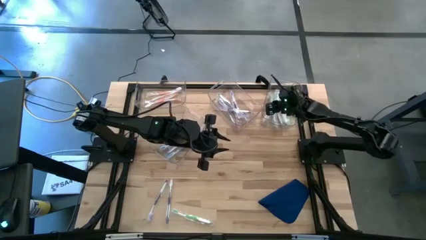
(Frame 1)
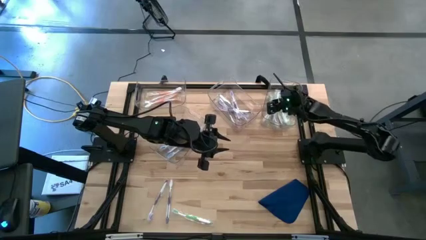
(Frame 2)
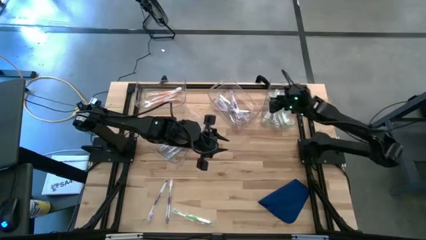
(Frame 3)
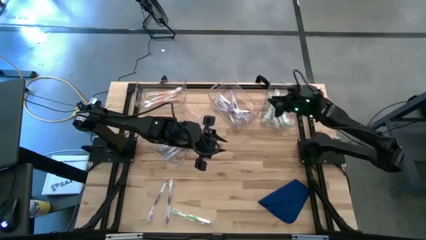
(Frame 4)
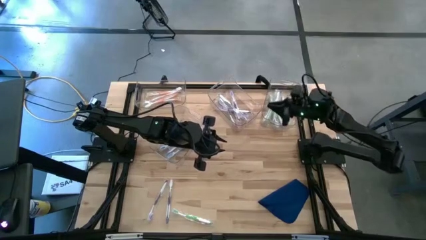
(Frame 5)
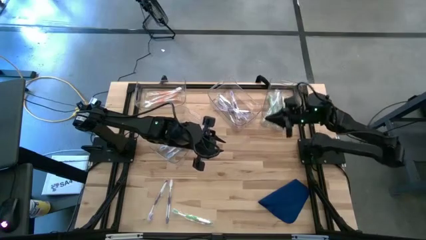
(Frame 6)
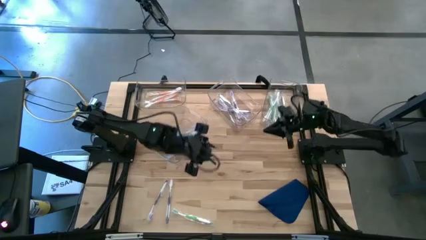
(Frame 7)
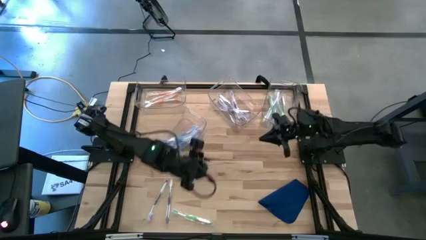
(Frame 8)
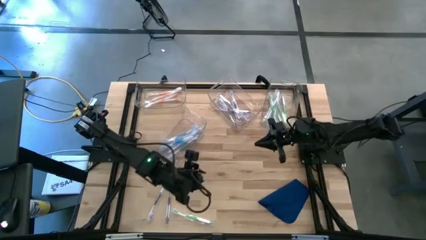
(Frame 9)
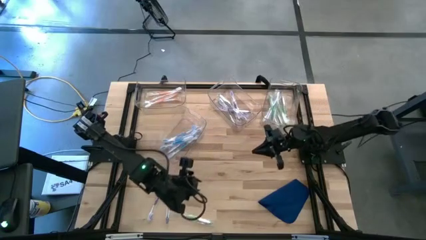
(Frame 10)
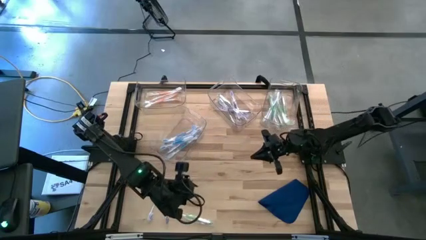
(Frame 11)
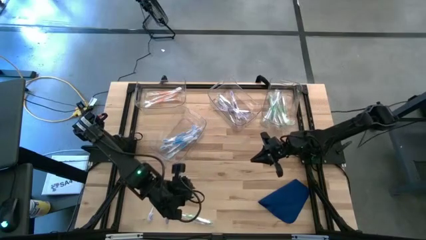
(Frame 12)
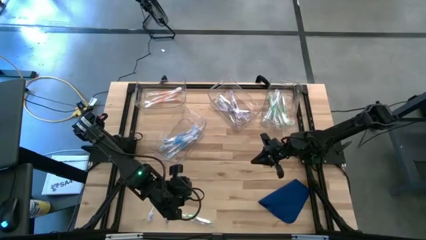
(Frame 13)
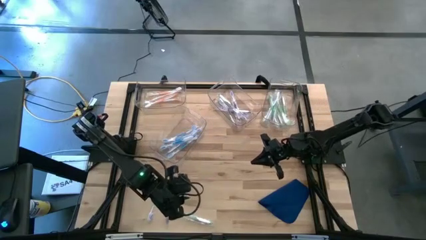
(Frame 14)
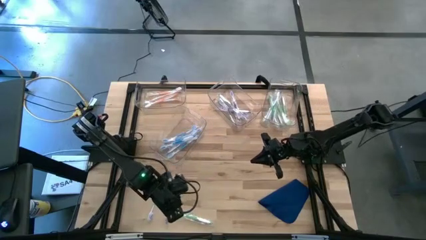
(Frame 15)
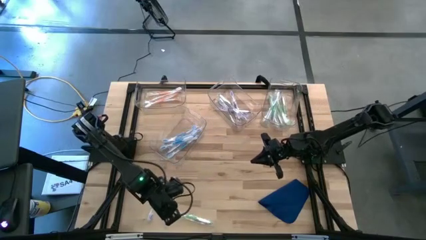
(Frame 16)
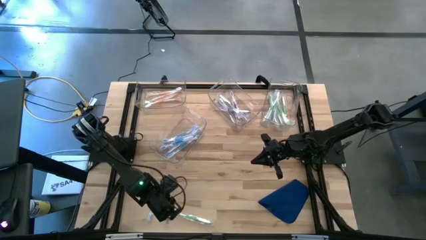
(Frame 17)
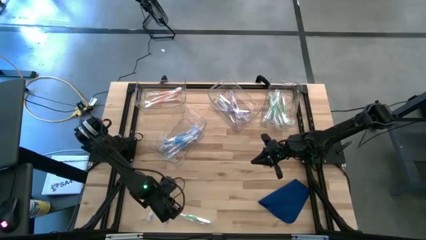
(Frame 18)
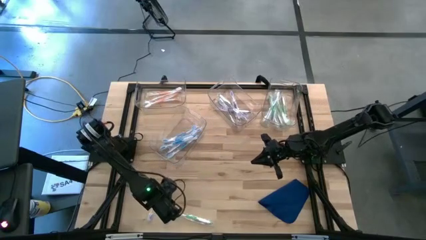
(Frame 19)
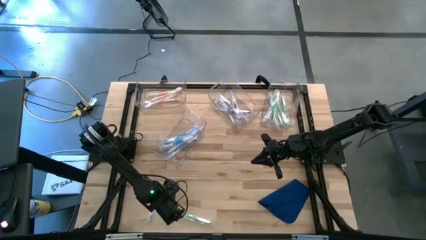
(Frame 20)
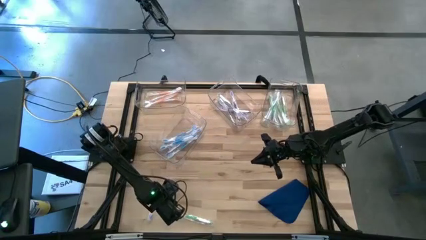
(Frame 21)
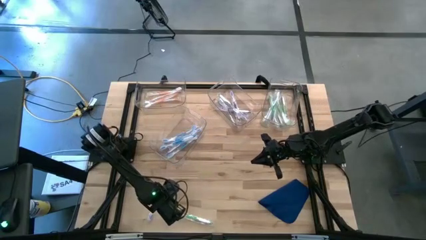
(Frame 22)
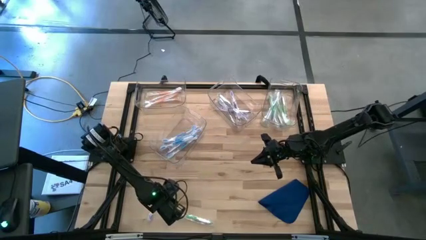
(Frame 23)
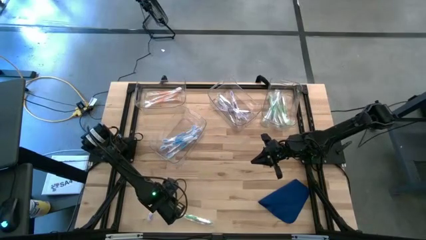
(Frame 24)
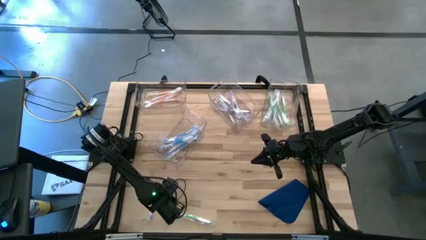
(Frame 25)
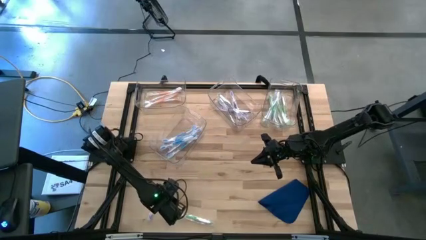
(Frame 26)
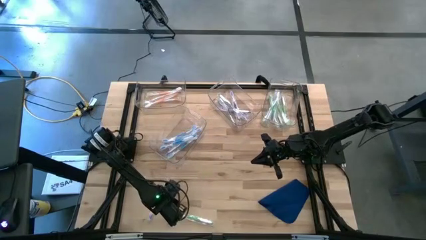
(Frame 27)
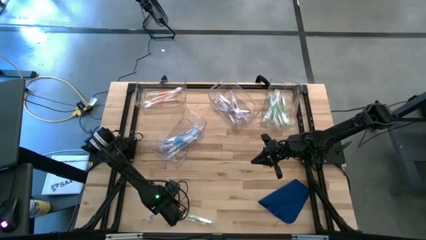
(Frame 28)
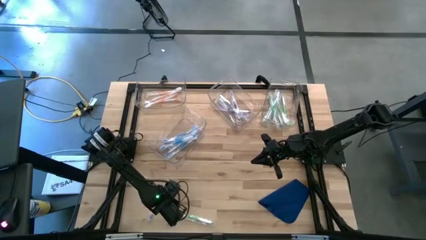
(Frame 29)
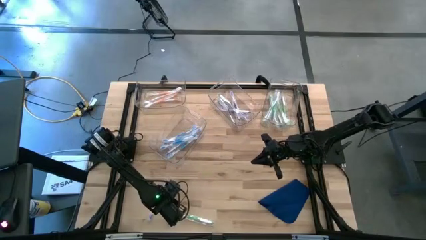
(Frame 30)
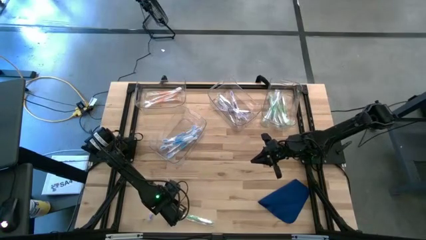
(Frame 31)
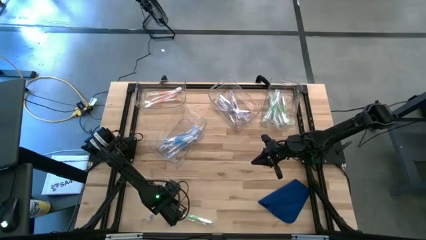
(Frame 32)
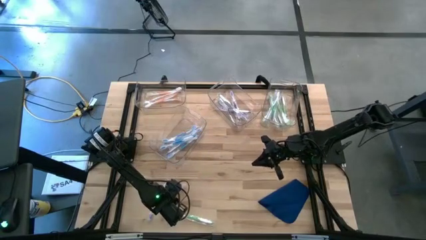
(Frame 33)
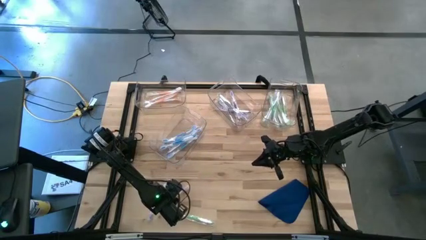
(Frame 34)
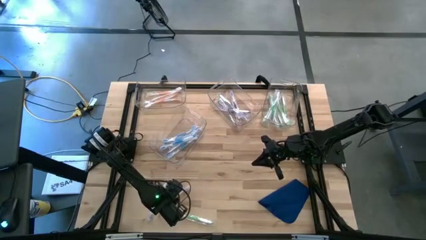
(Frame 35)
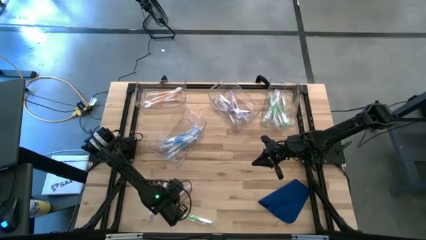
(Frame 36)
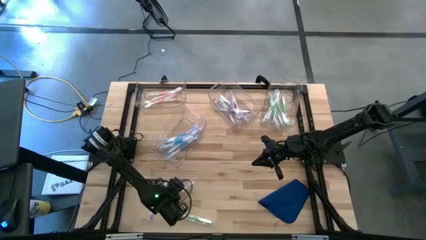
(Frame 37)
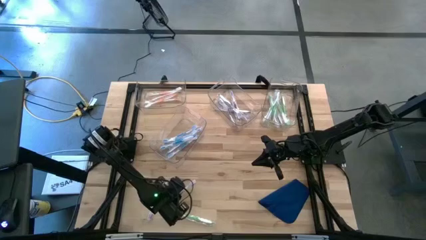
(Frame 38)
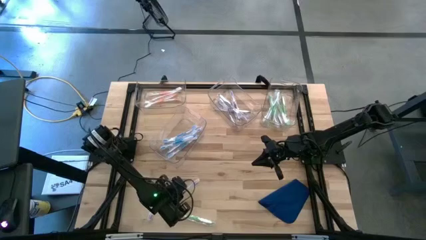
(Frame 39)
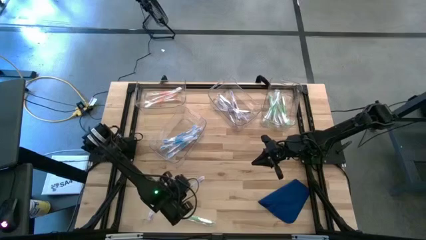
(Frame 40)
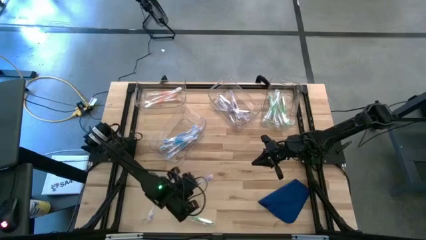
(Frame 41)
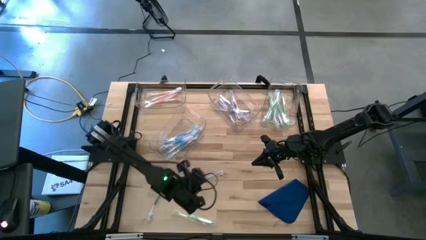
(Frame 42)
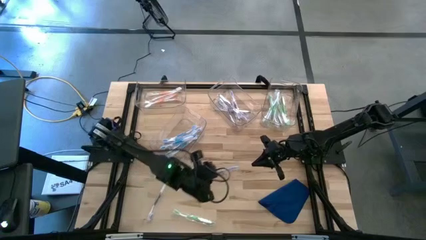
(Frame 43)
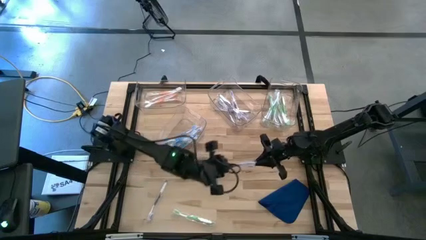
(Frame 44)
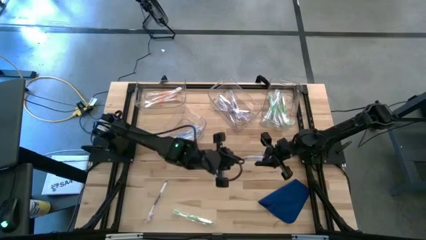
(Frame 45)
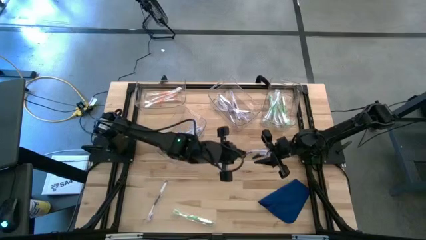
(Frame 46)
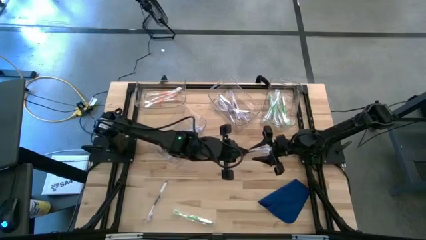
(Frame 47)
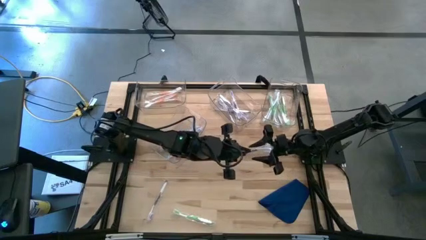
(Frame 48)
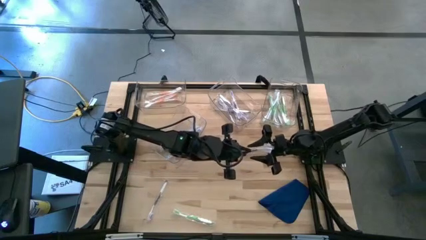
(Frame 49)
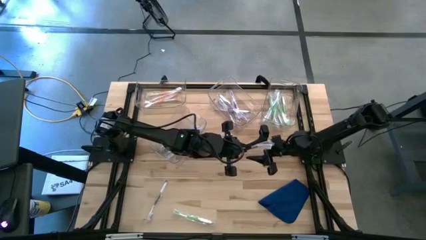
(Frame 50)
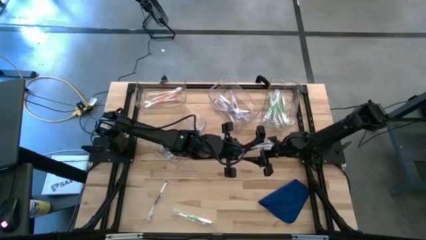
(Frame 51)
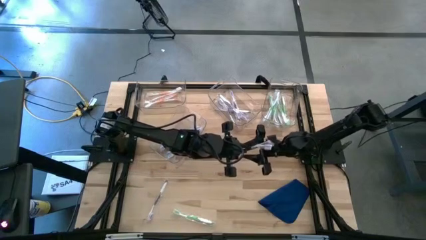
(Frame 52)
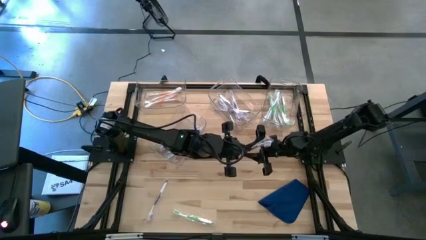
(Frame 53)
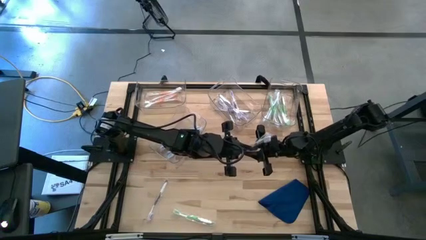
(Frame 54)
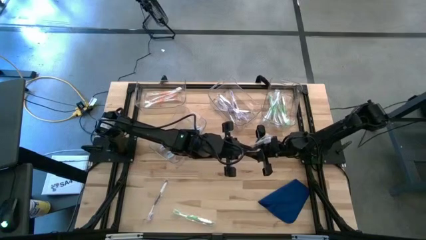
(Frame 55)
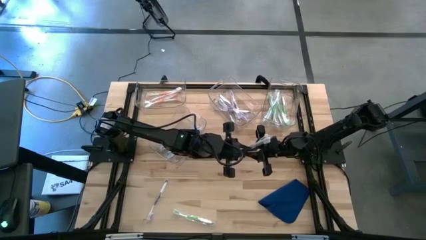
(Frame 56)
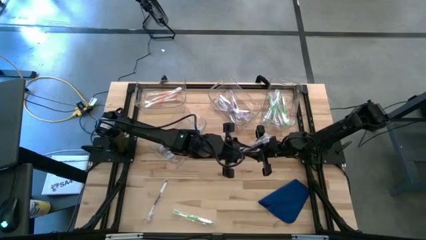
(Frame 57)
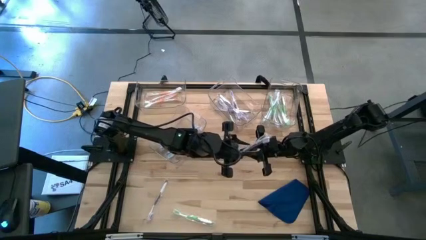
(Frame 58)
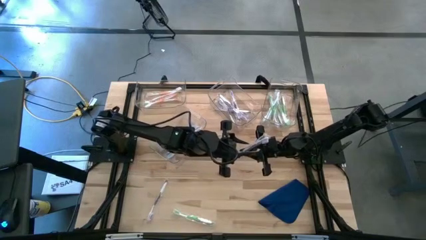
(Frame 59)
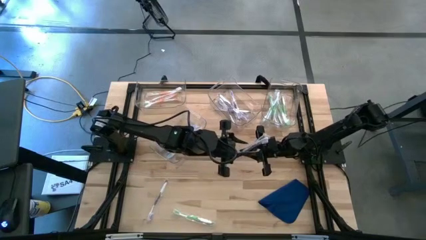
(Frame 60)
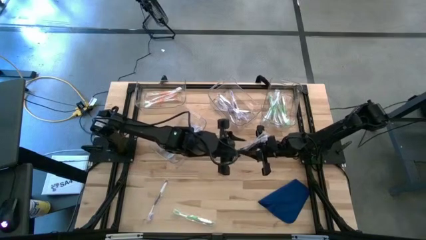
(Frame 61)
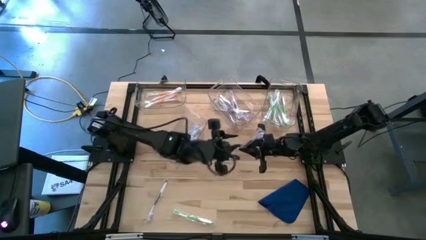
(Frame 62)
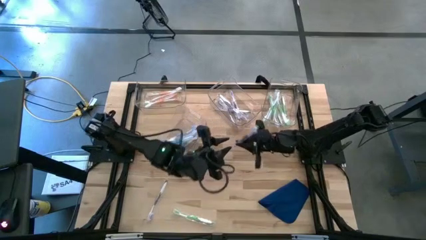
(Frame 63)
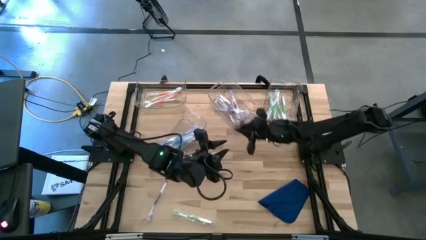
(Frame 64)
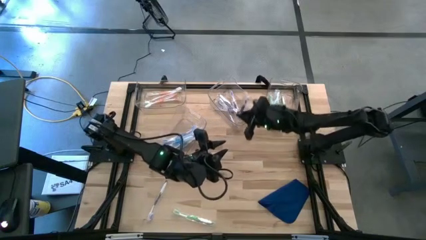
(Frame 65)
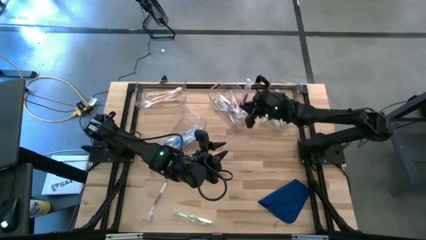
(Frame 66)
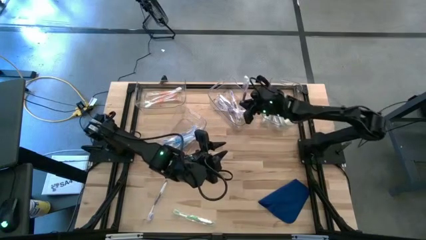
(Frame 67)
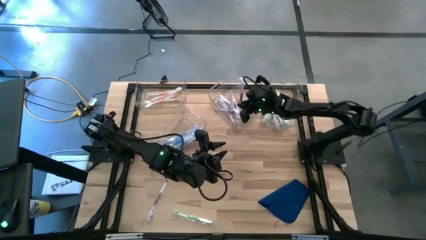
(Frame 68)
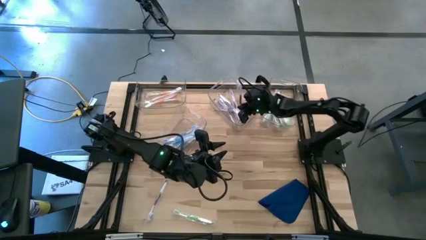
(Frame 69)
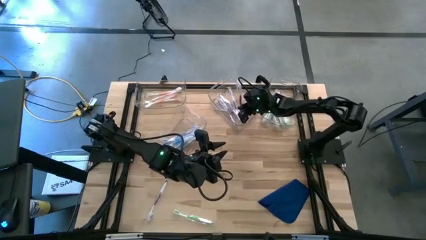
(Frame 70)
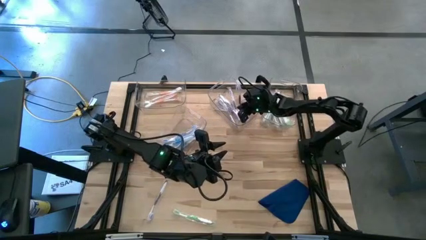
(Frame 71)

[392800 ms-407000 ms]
Task: Pick & Place Toothbrushes
Put the purple toothbrush into the top center transparent bin
